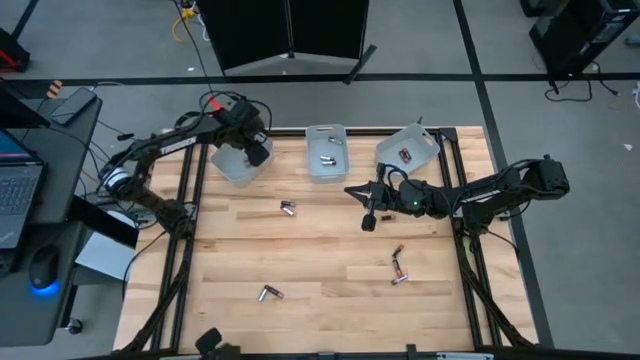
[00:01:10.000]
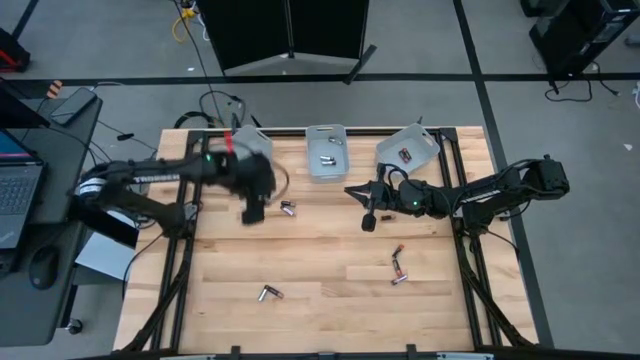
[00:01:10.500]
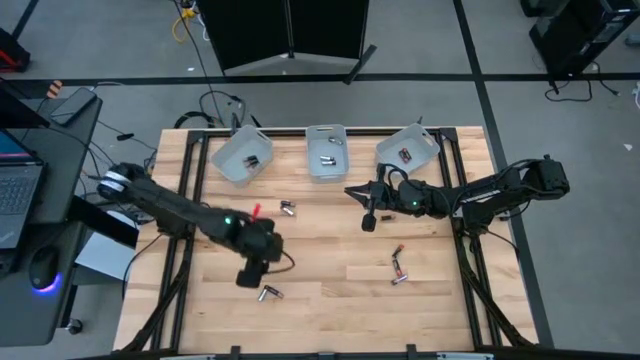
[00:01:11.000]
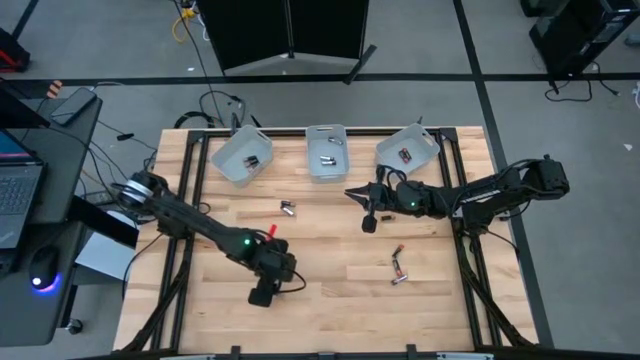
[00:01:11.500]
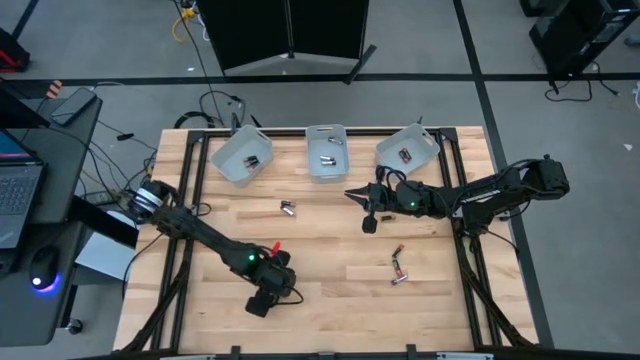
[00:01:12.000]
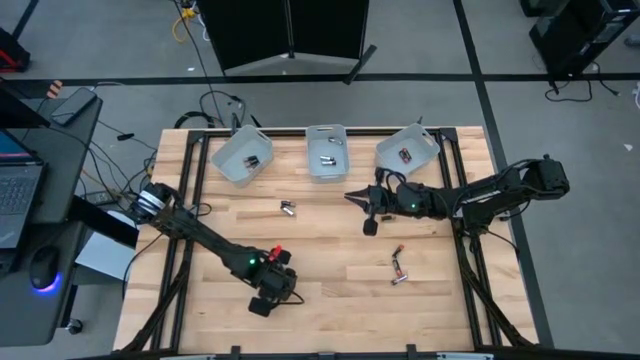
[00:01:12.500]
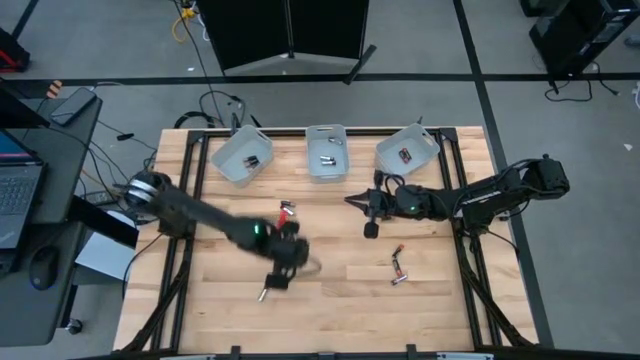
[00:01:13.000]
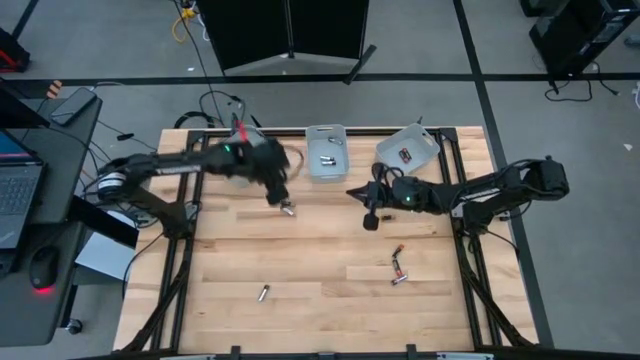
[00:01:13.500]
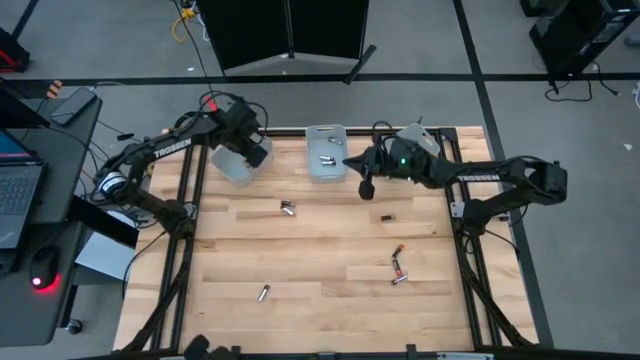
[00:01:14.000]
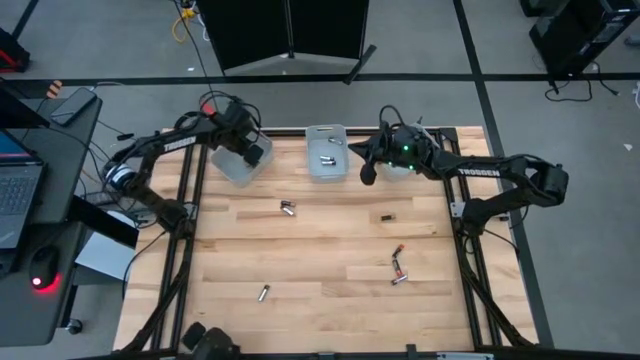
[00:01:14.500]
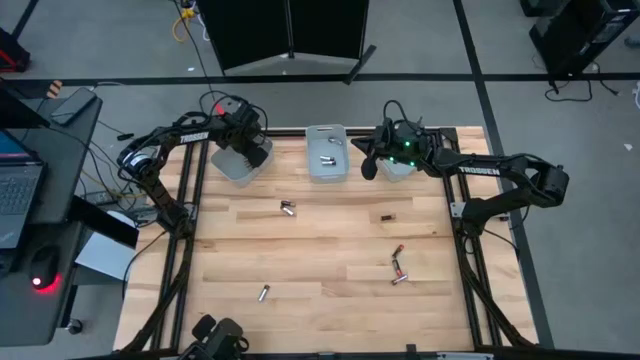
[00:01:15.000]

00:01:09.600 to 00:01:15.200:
Task: Sort batteries
Put the gold battery into the left gray bin

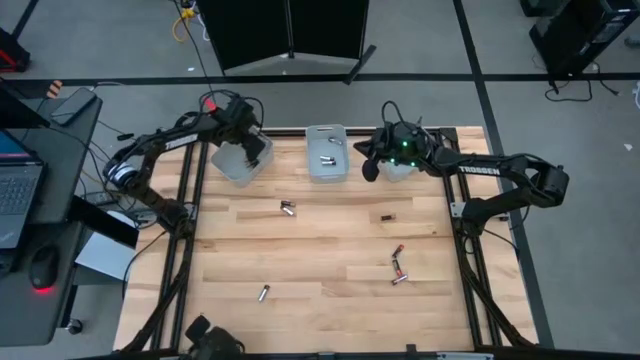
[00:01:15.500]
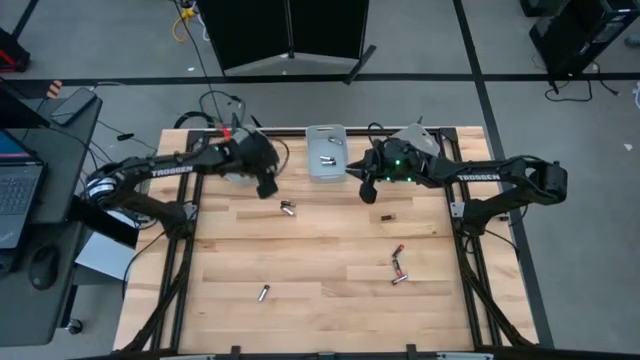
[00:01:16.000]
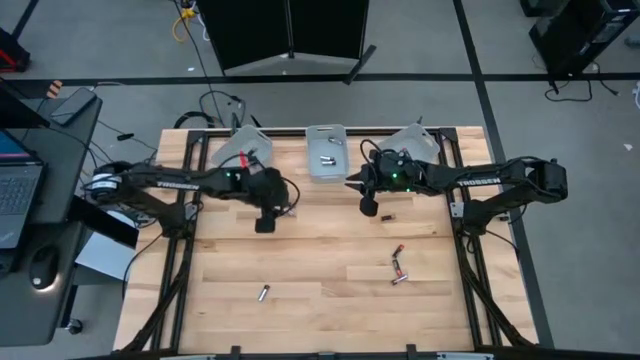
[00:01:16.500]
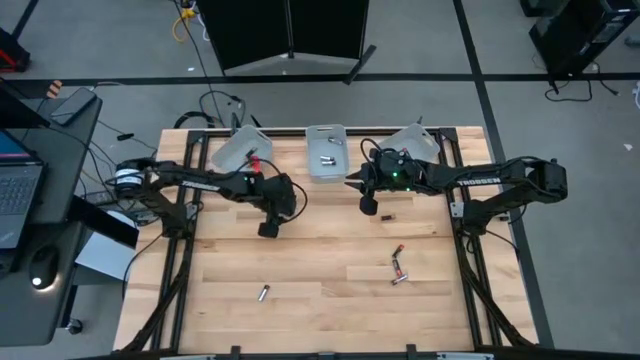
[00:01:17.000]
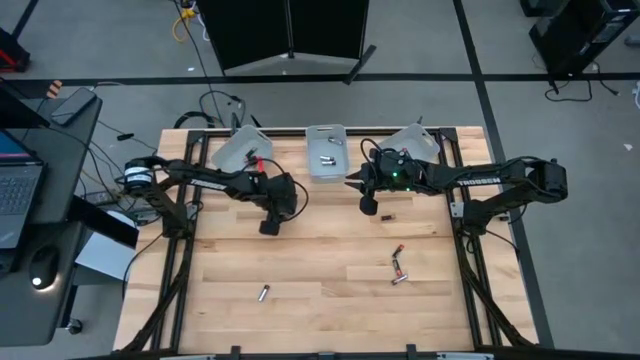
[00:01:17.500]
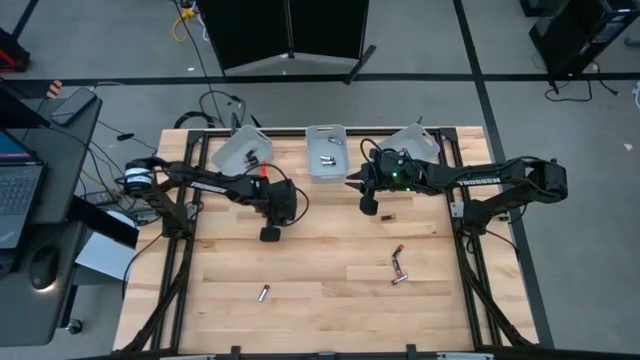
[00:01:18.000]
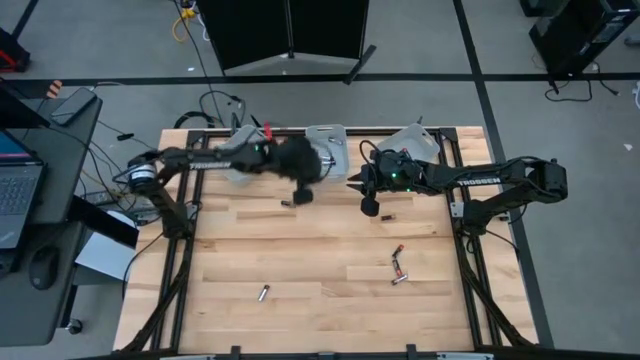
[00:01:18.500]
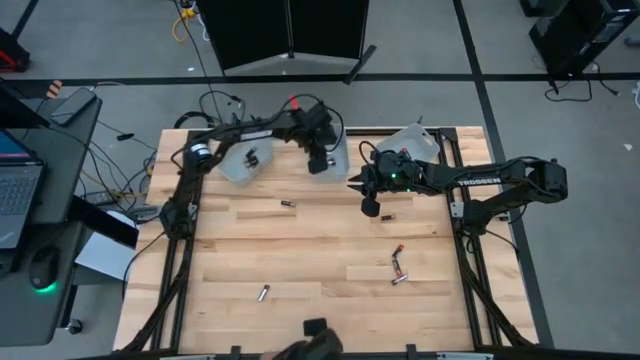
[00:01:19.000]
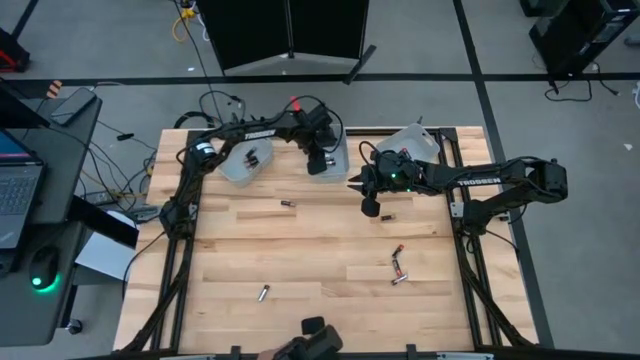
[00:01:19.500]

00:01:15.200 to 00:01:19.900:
Put the silver battery into the middle gray bin

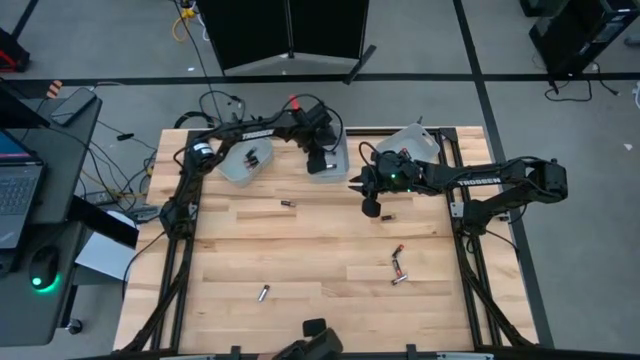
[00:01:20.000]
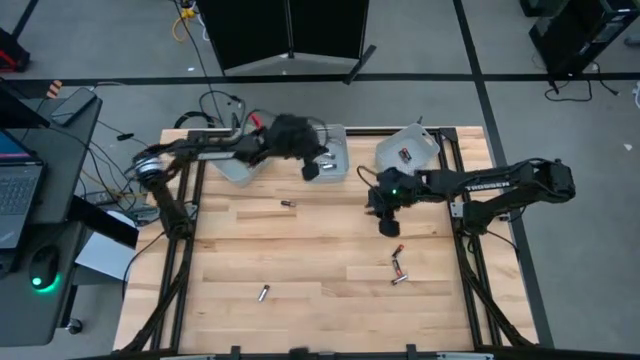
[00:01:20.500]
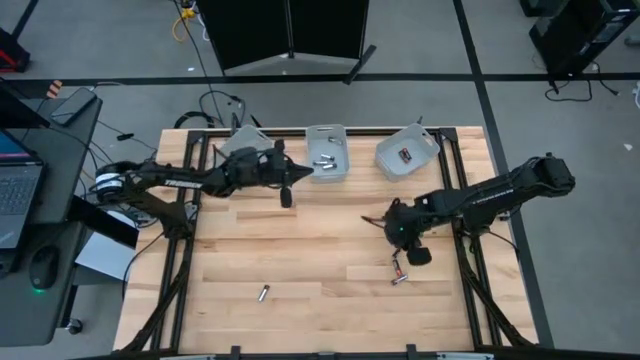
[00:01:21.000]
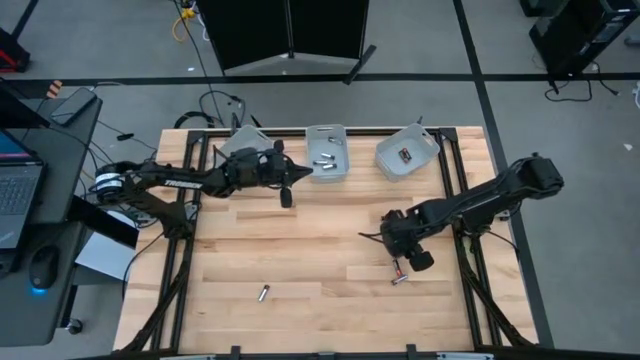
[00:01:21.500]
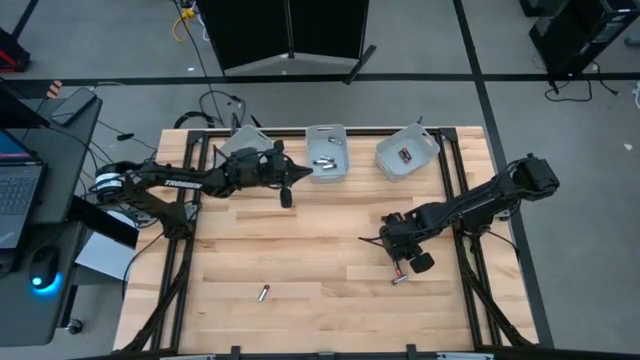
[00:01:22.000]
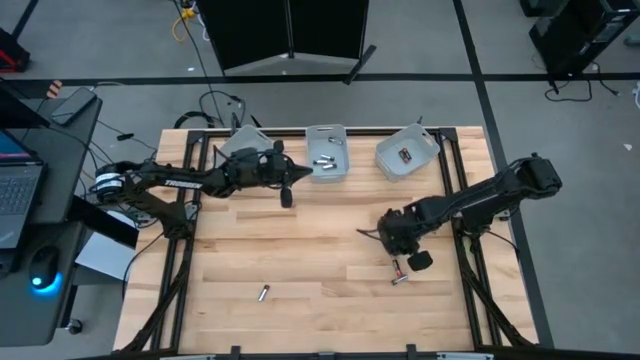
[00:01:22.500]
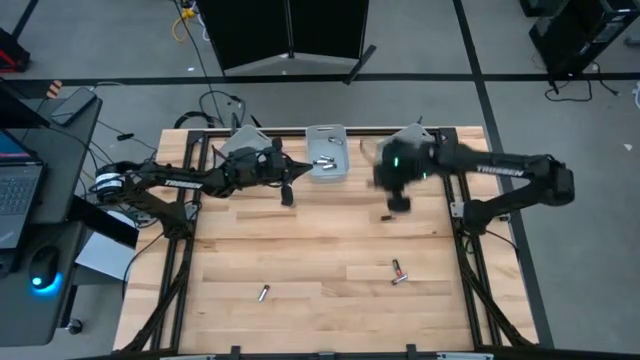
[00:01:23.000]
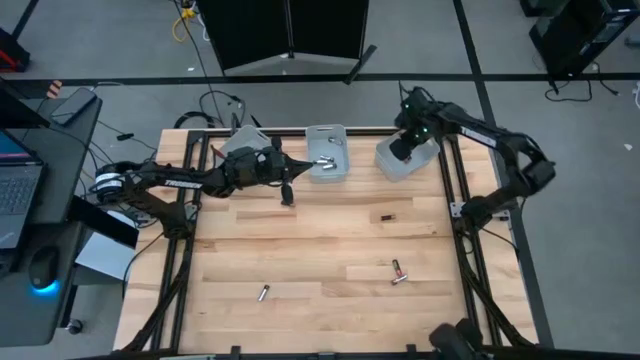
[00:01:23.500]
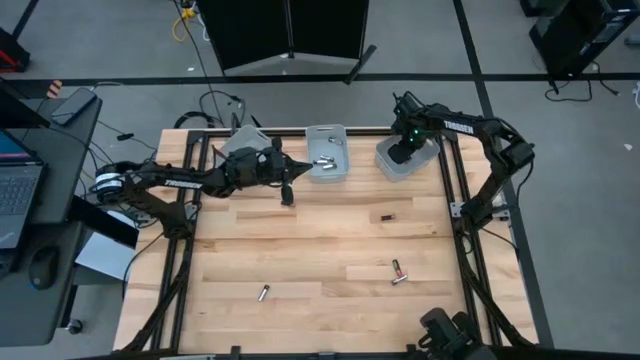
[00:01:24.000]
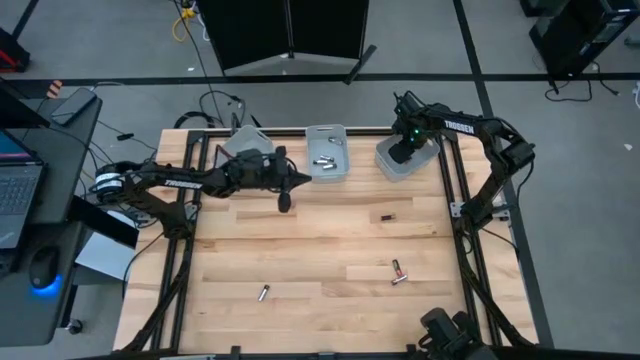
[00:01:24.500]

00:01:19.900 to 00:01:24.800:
Put the red battery into the right gray bin

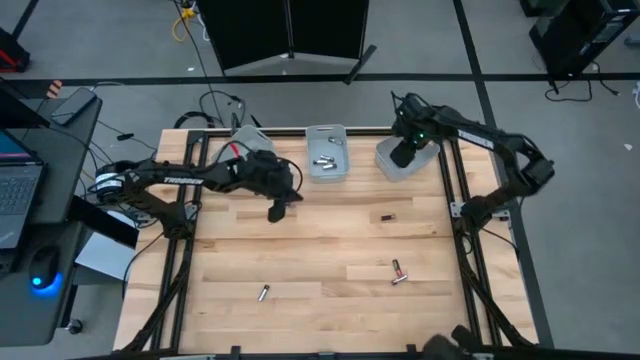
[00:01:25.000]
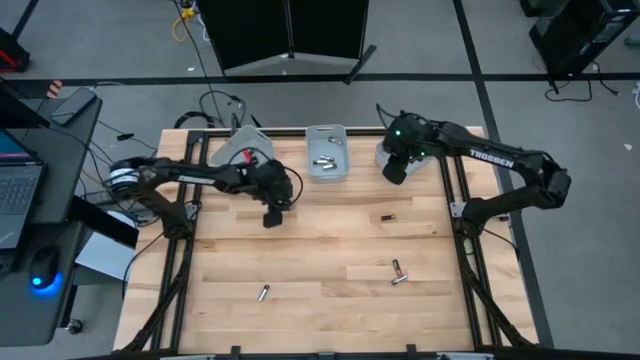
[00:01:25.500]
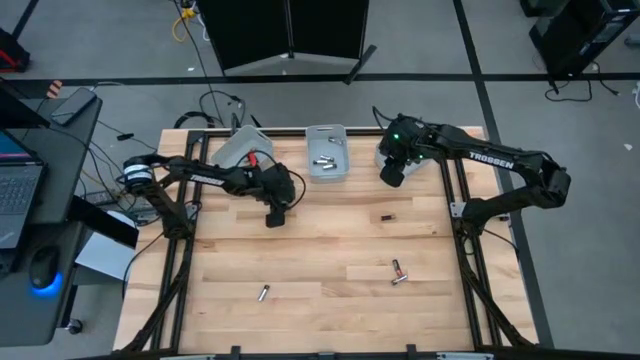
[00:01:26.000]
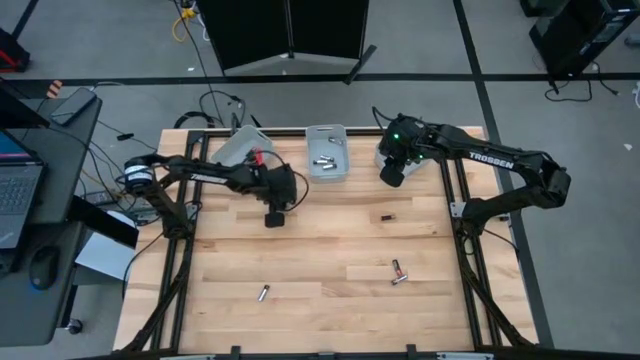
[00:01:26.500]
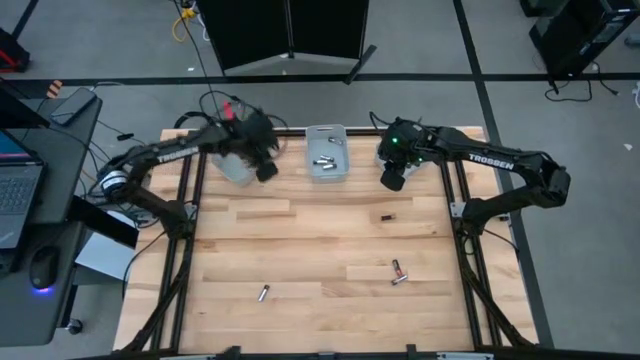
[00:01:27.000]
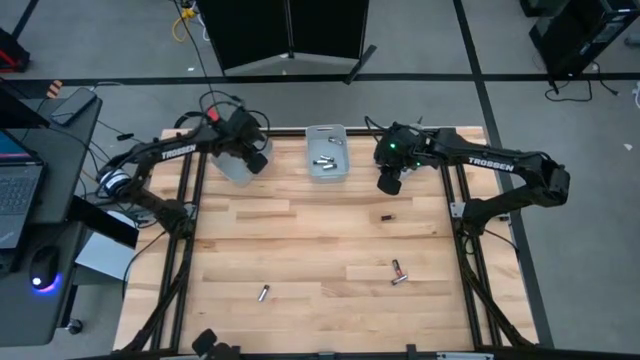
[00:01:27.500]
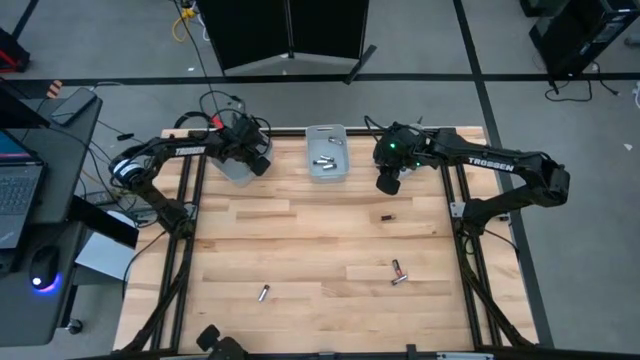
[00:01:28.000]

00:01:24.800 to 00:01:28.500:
Put the gold battery into the left gray bin
